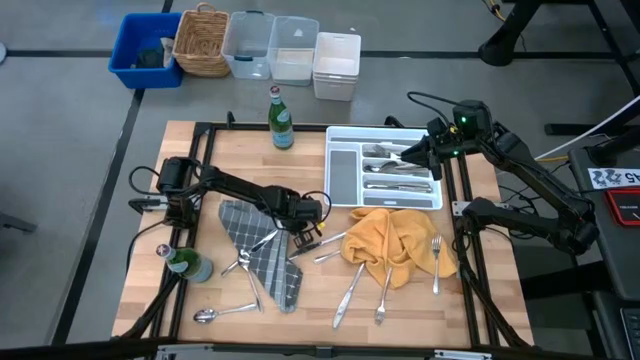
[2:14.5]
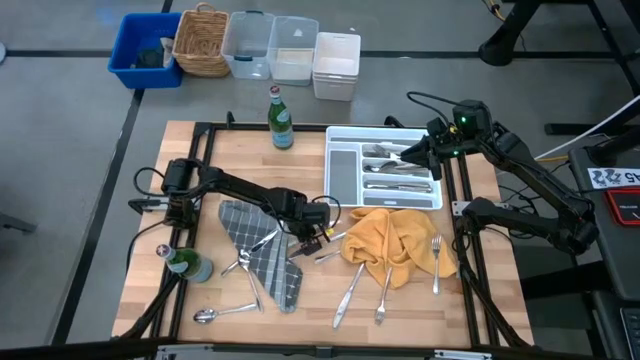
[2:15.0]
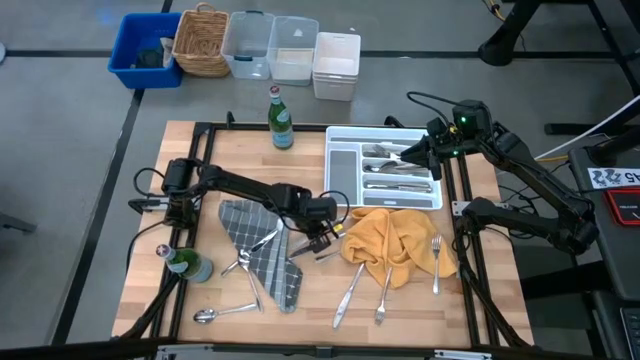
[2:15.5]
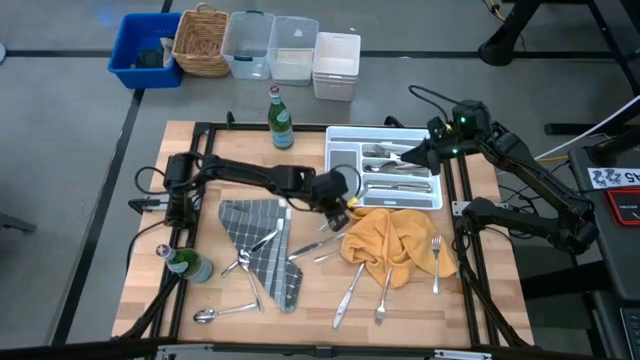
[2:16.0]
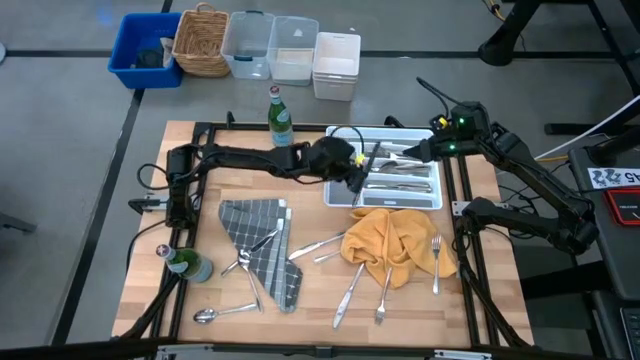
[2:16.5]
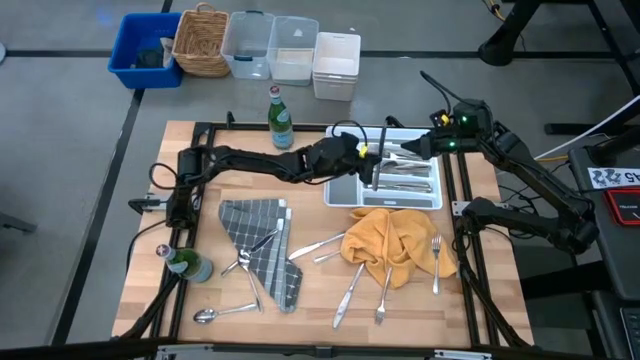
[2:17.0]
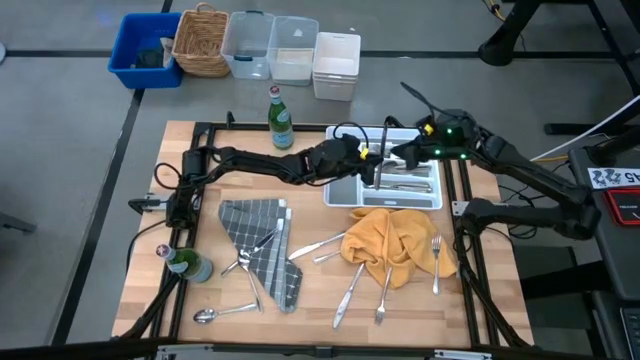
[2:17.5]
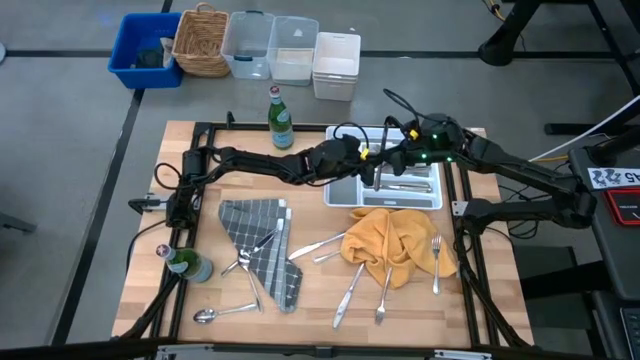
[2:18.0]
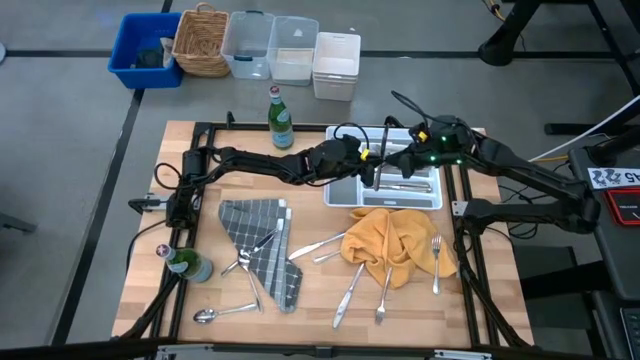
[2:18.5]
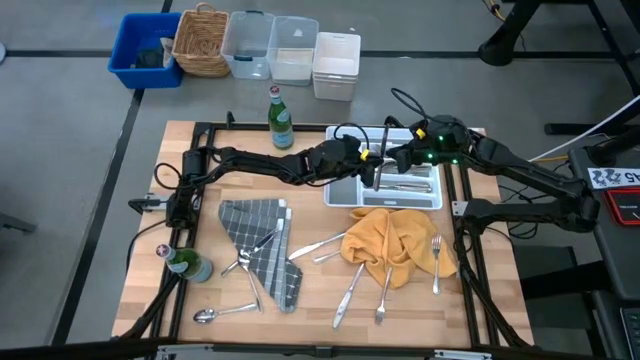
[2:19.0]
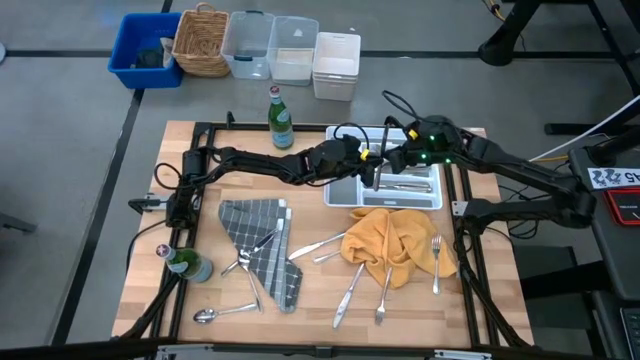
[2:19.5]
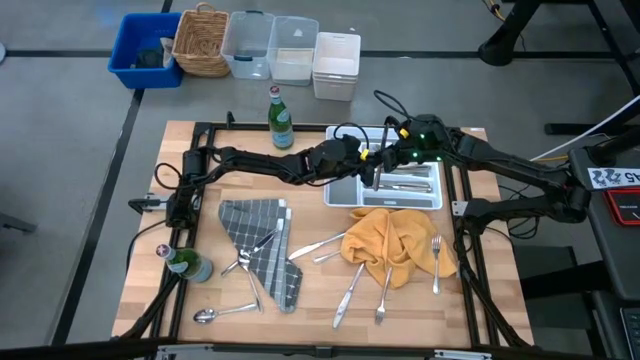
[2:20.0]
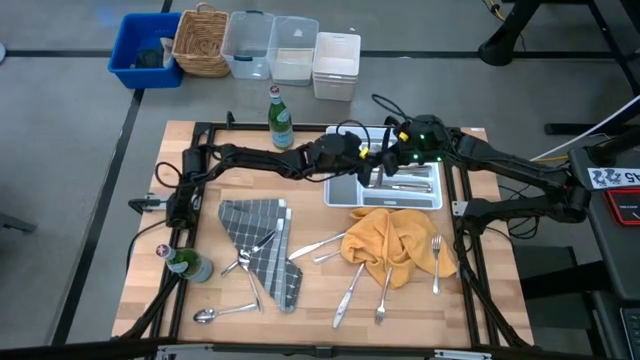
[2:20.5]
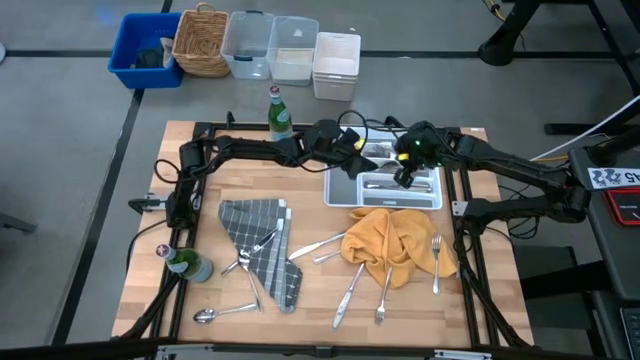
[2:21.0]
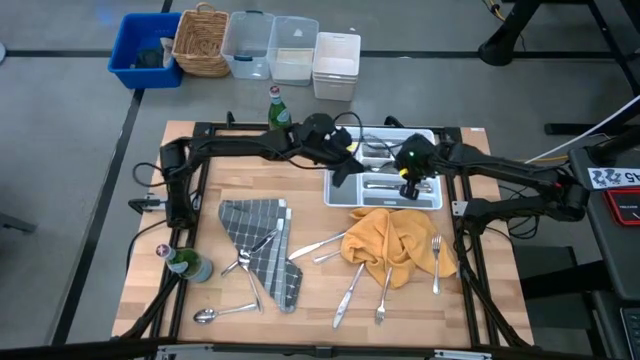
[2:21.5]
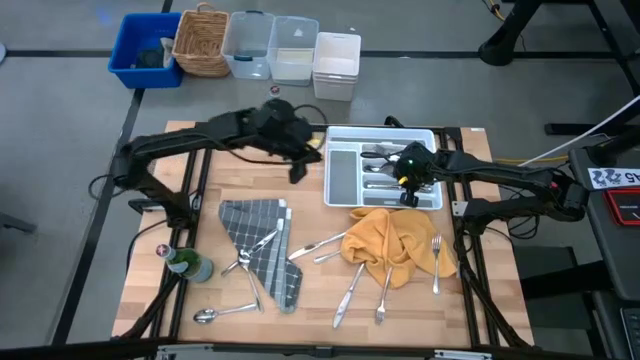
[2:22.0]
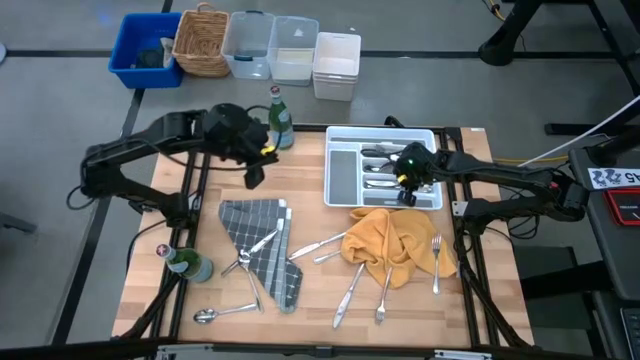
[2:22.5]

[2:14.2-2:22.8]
Put the silver knife into the cutlery tray

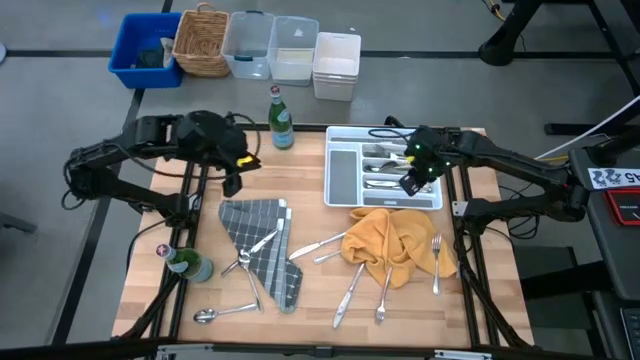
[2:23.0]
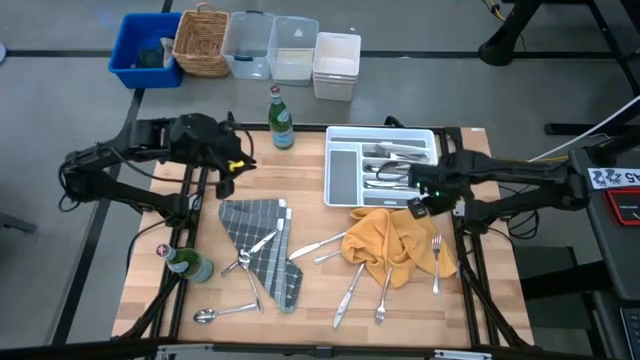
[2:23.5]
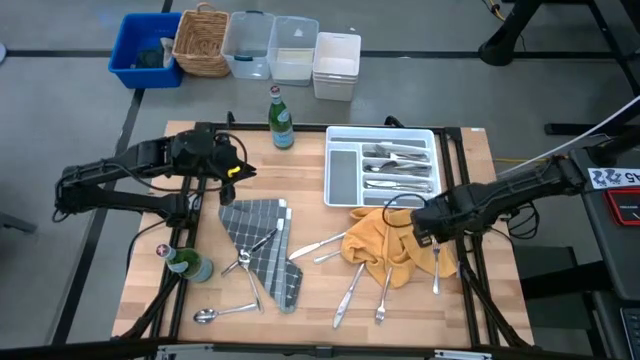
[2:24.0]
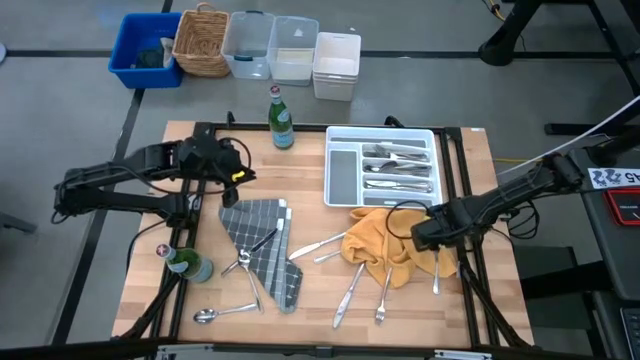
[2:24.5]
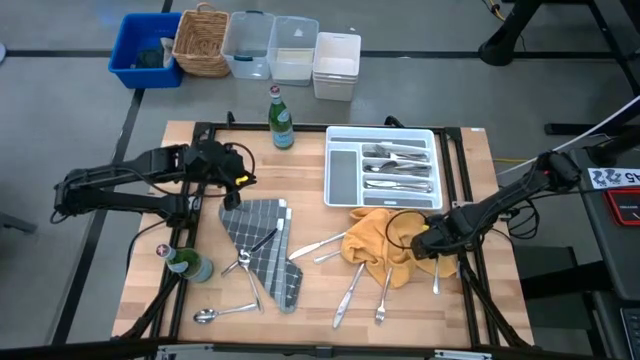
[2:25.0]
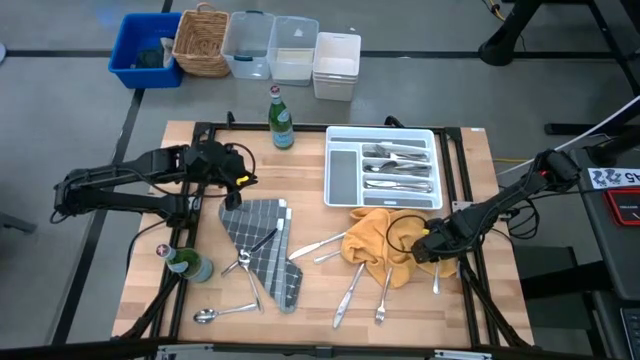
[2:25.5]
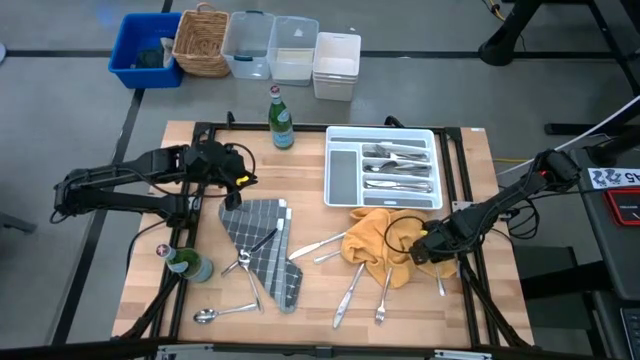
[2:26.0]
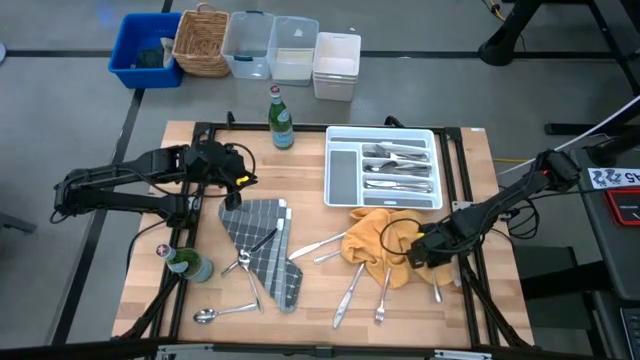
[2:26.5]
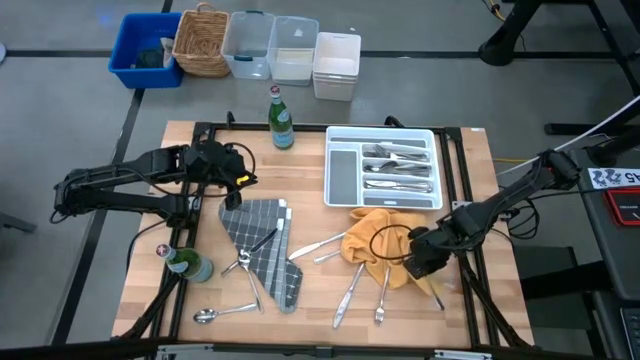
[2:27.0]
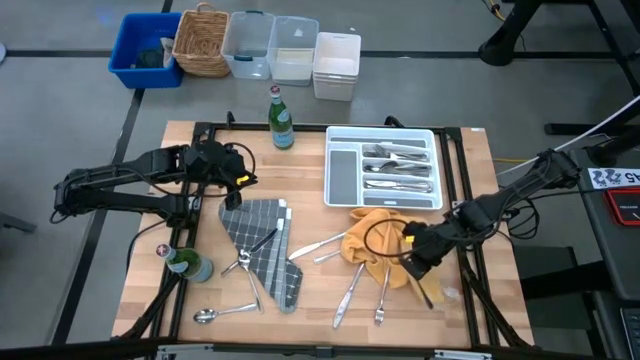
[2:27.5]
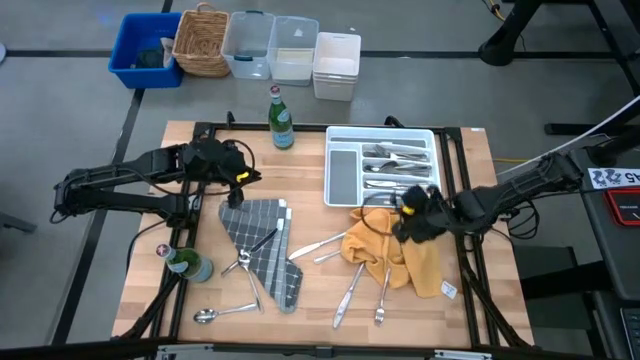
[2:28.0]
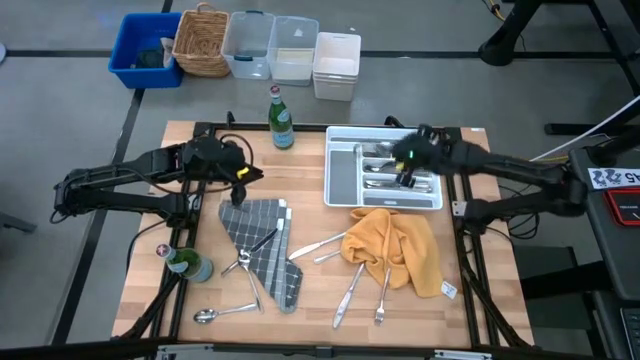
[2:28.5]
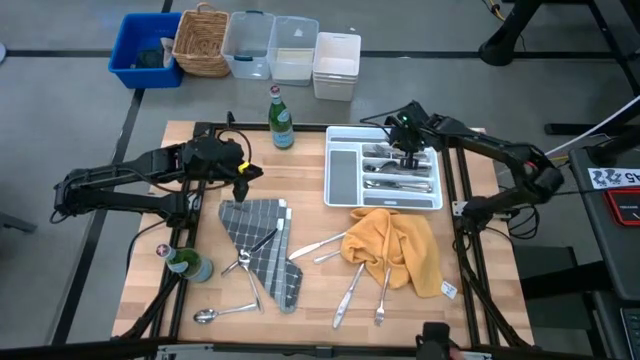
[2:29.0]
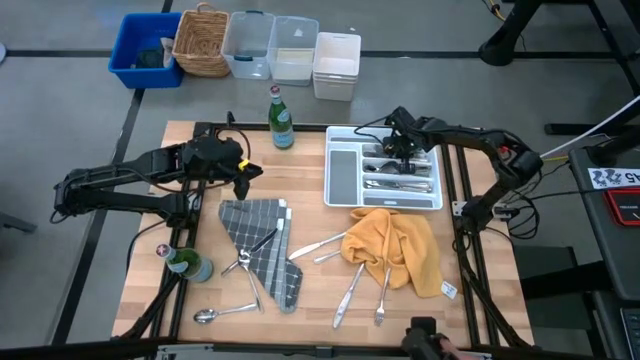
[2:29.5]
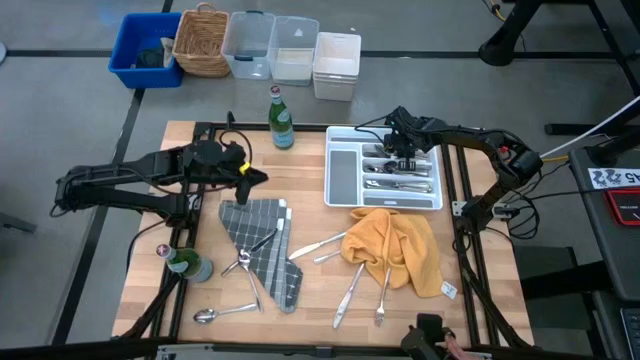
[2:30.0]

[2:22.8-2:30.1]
Put the silver fork into the cutlery tray
